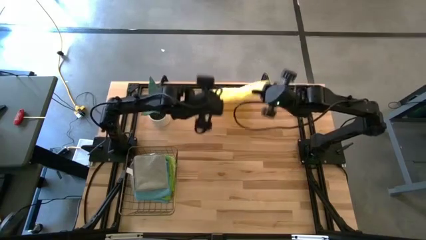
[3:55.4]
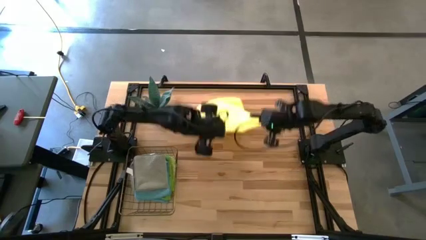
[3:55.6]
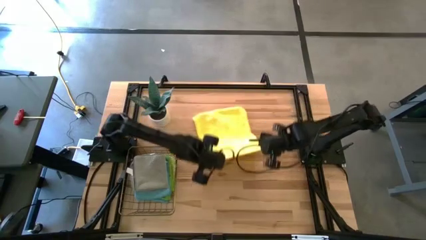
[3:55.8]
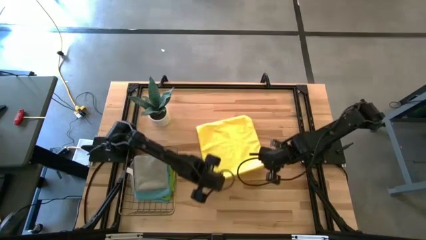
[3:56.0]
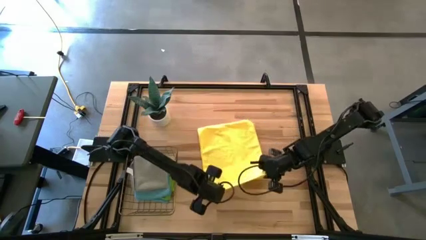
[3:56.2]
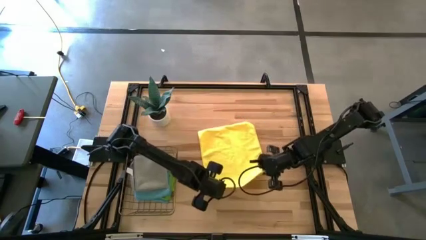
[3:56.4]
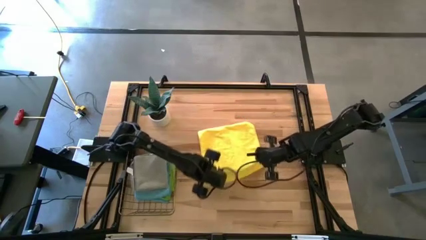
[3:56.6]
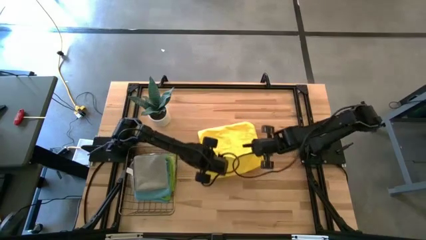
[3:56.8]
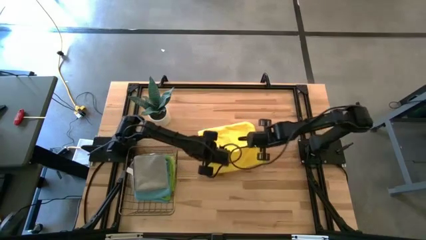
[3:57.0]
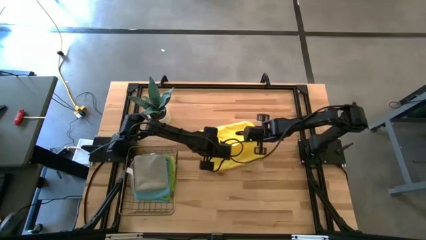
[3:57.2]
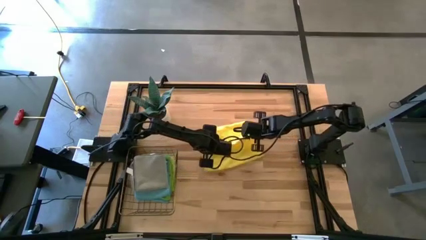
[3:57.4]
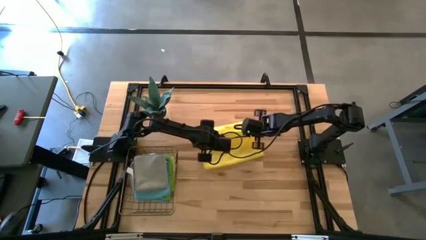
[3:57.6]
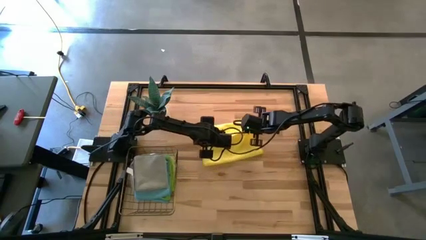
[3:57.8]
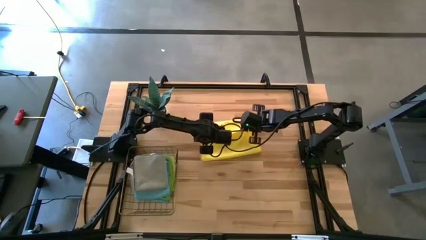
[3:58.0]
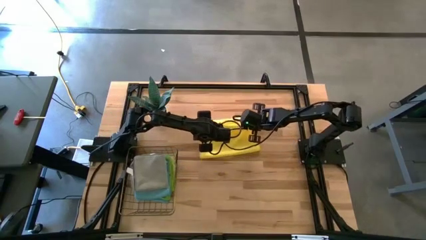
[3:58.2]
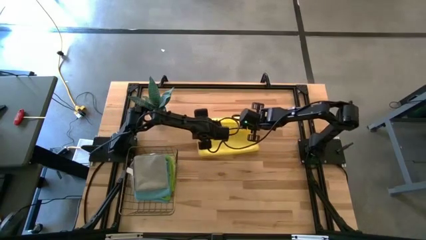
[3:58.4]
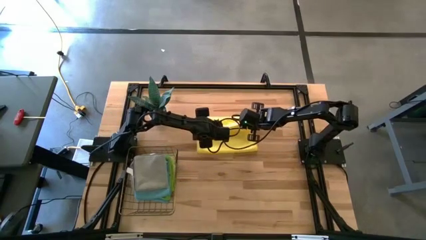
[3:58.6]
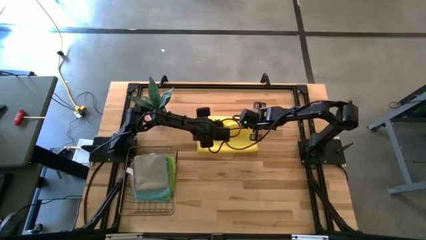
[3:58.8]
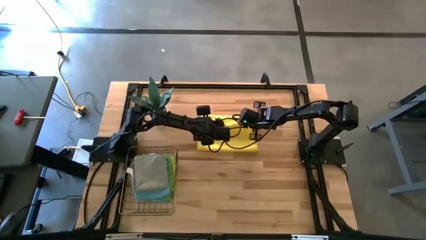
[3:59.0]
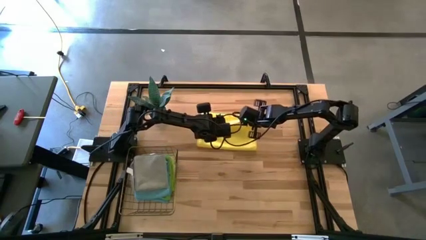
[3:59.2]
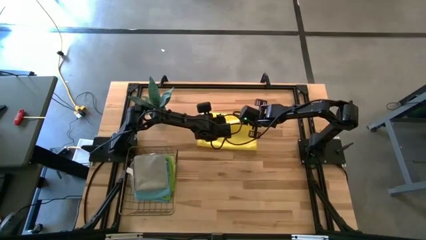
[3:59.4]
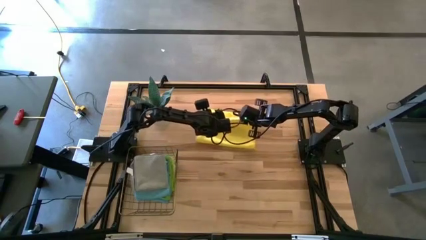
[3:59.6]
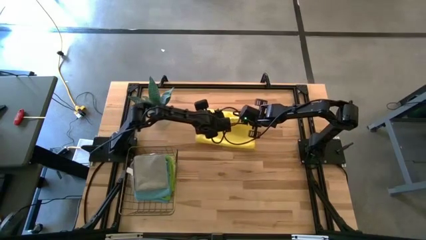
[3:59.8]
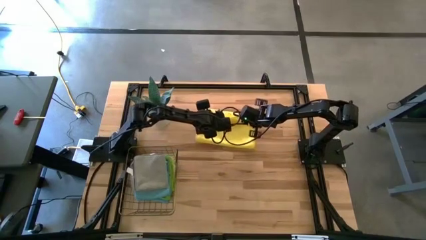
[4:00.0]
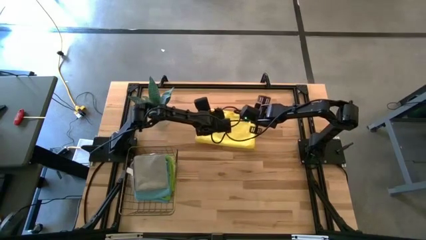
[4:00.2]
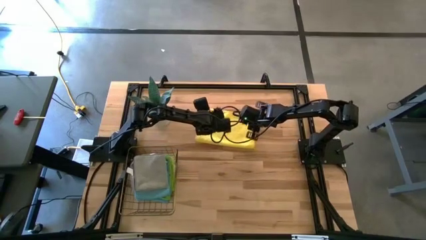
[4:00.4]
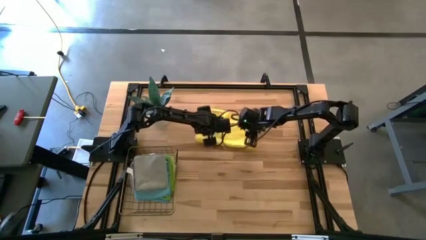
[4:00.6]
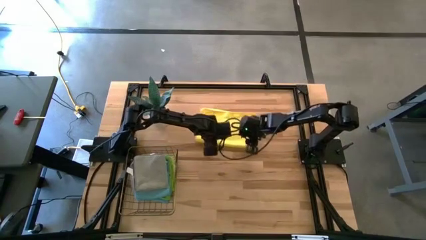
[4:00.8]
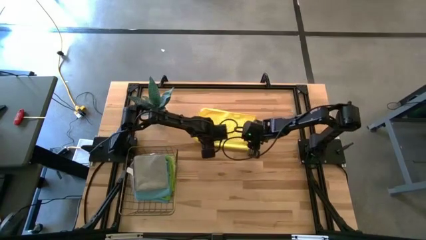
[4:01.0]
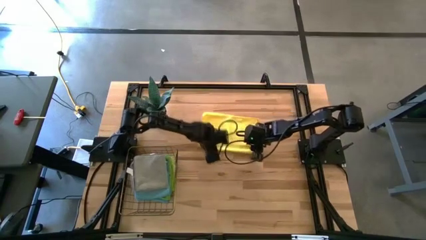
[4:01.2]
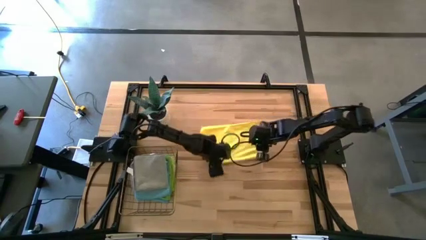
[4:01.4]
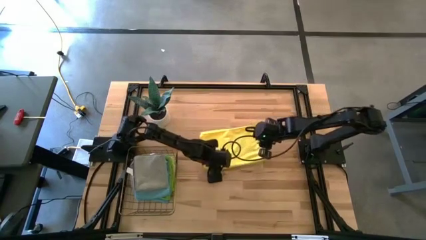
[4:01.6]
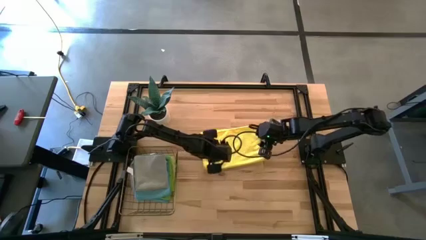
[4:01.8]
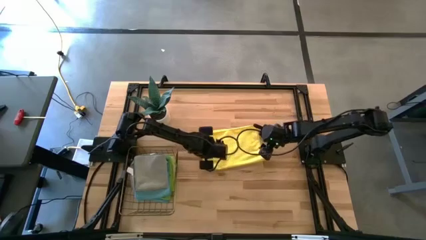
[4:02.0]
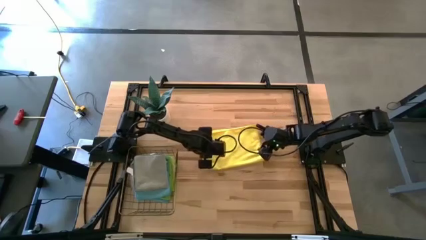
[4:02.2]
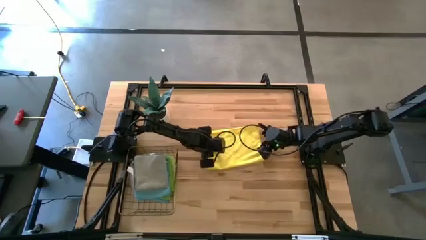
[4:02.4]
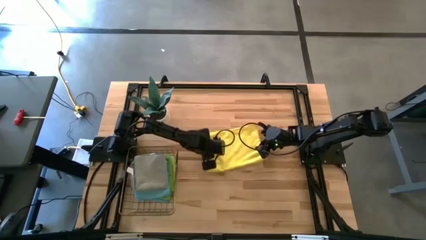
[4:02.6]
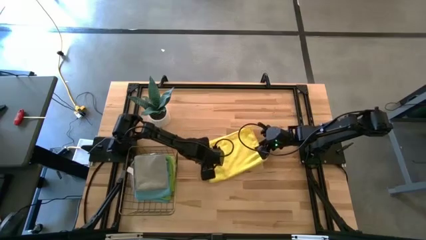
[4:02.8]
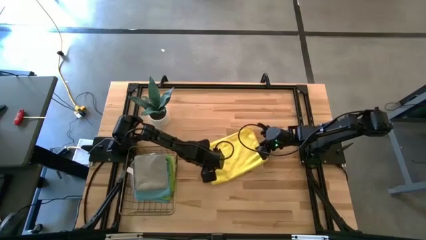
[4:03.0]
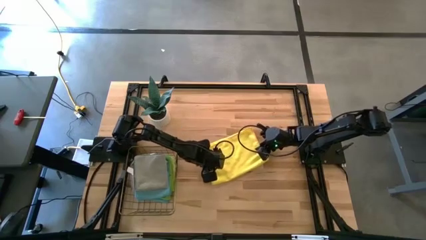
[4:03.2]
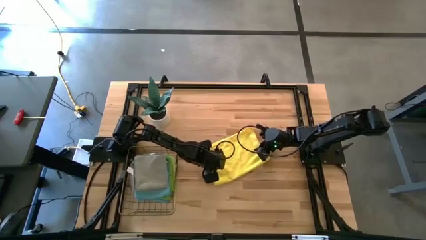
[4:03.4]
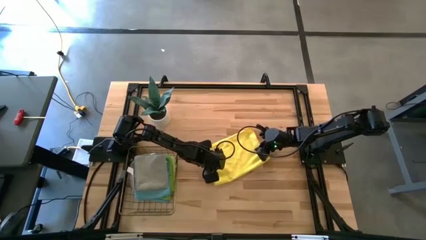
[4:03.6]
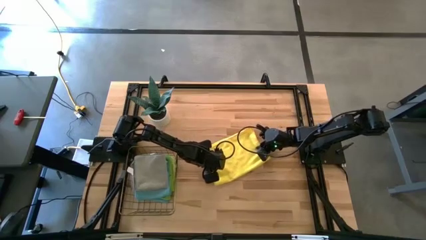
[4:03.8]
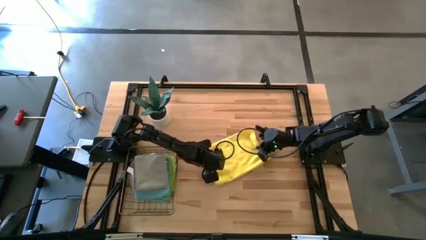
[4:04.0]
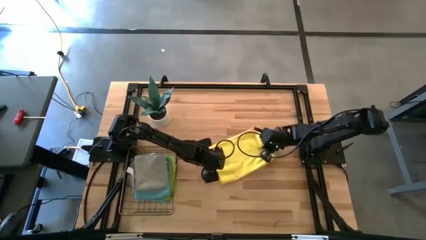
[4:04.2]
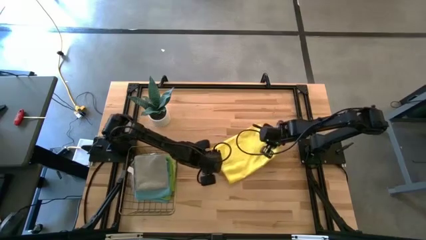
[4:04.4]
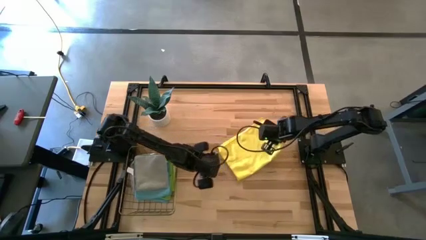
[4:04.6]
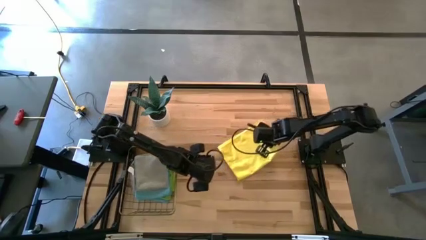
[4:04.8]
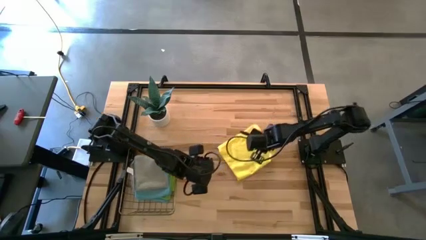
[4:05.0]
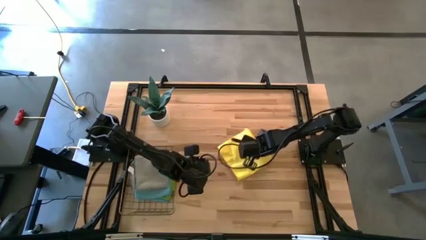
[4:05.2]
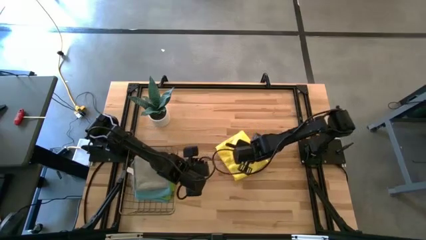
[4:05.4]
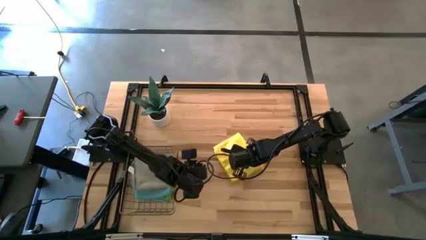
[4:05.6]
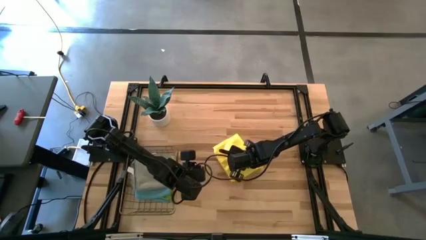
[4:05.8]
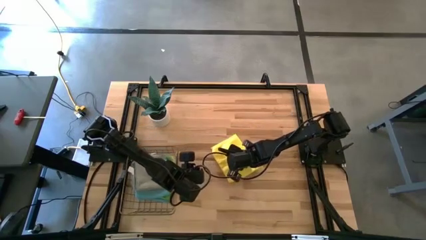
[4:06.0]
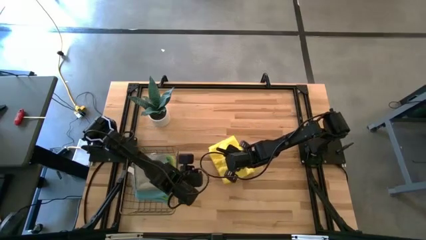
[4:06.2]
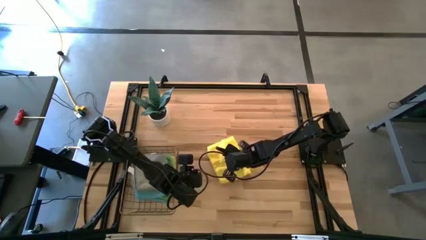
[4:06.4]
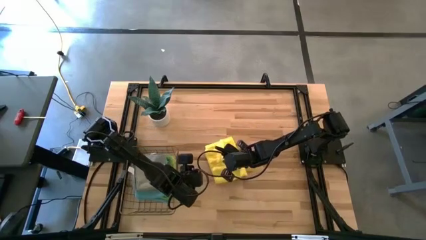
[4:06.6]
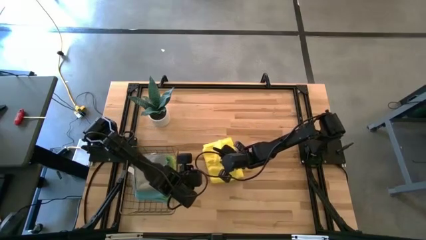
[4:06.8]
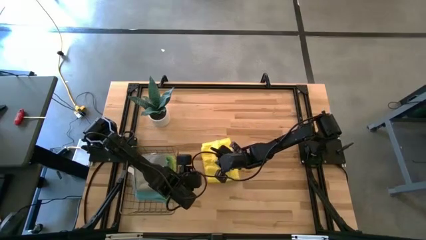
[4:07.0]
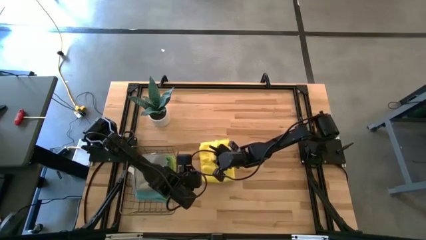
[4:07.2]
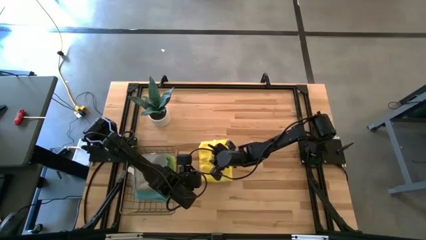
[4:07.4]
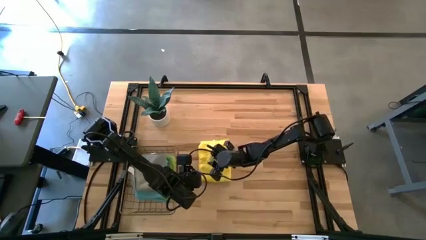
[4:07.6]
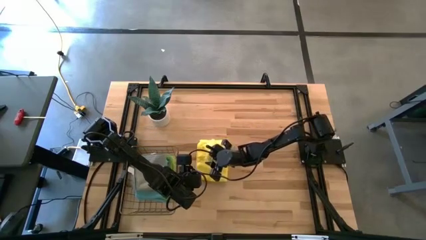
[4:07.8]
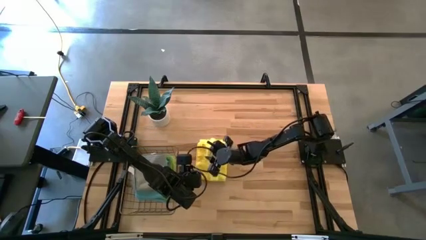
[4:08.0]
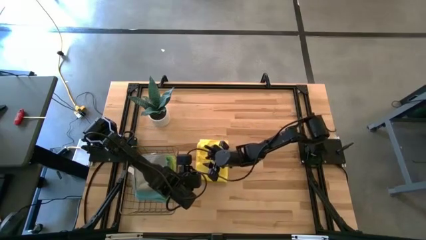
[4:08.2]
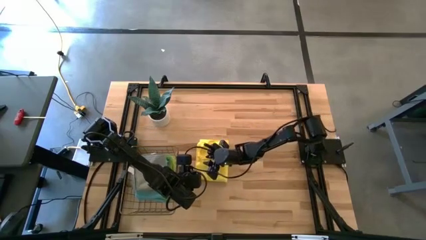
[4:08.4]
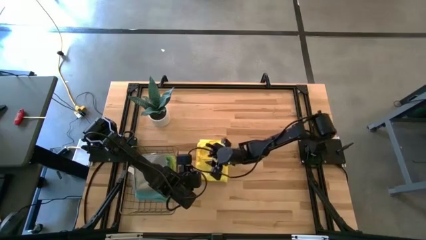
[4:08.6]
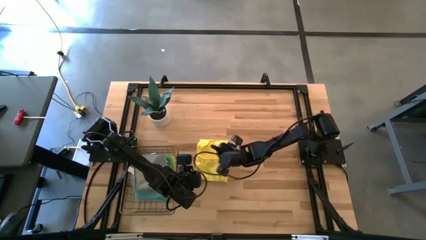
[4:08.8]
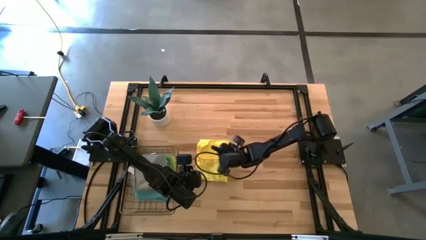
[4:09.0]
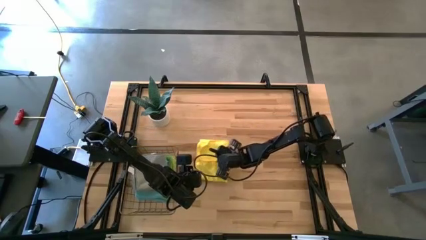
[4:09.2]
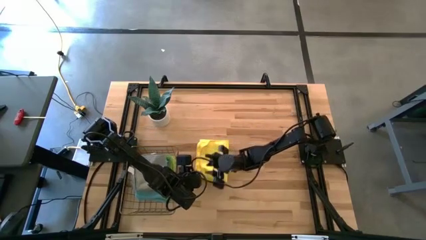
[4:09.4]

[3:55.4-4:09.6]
Task: Fold microfiber towels
Fold the yellow microfiber towel
